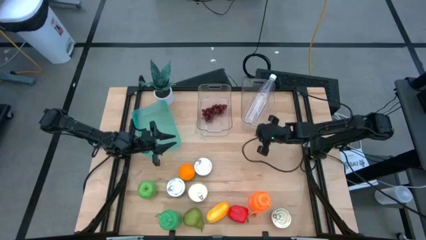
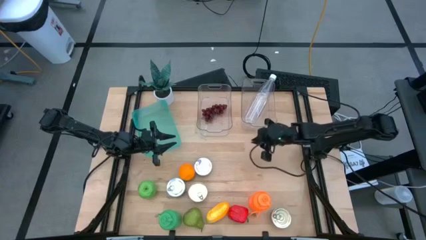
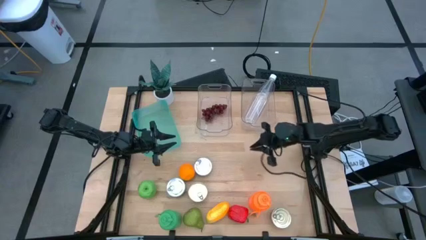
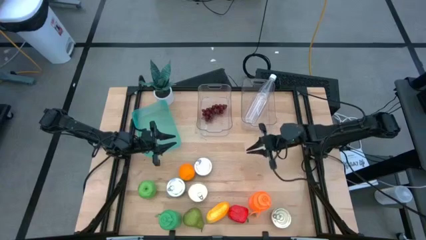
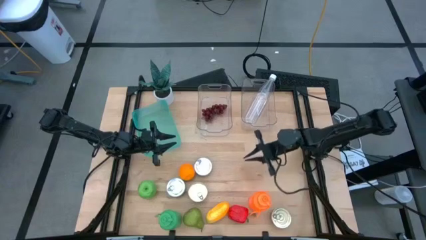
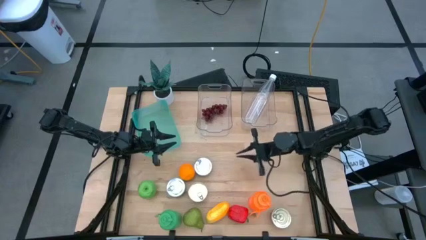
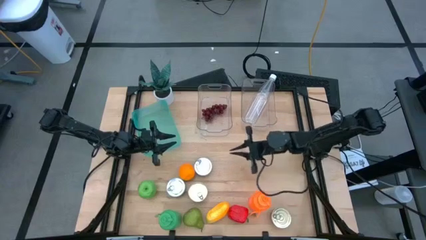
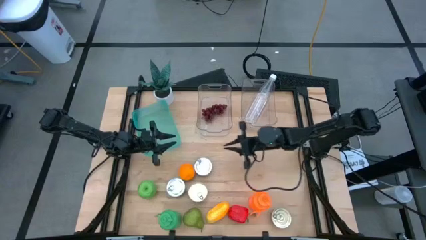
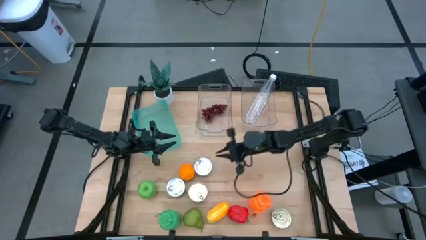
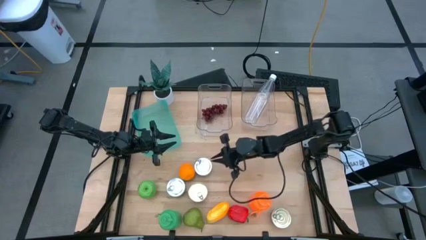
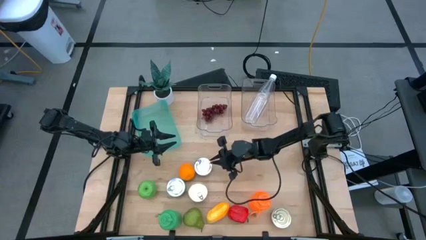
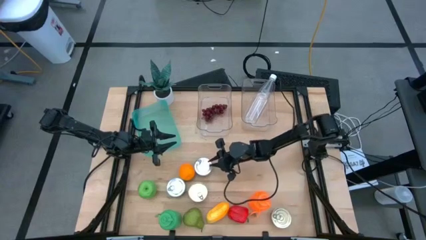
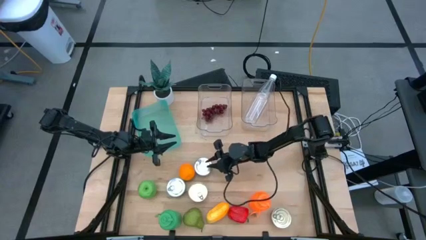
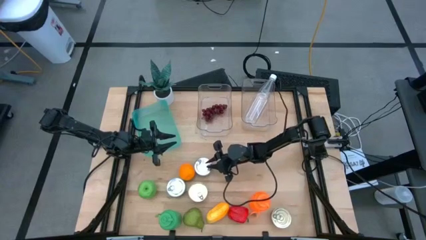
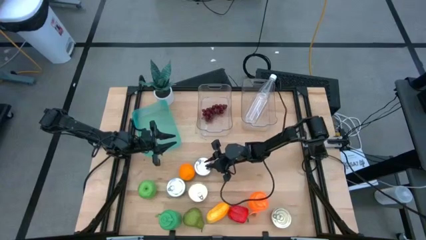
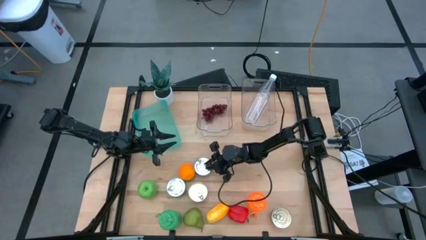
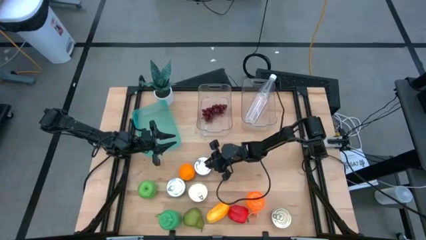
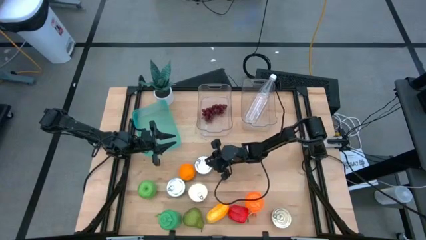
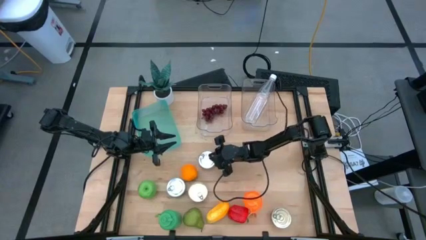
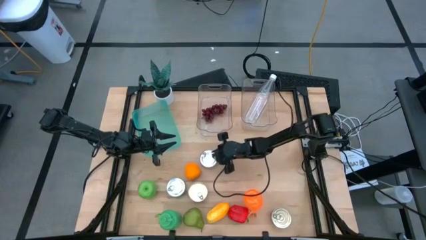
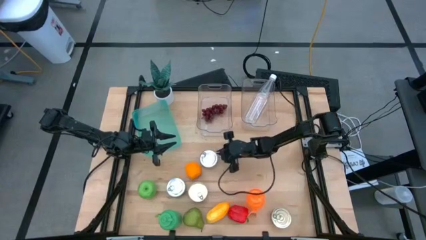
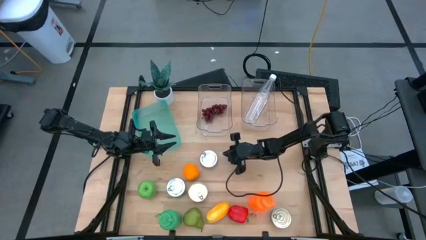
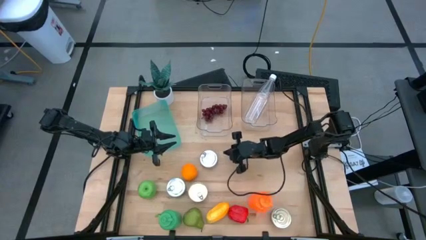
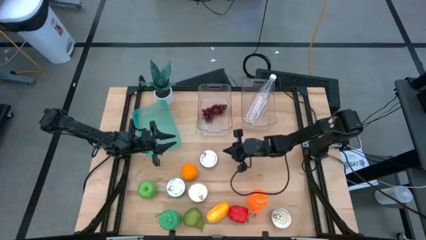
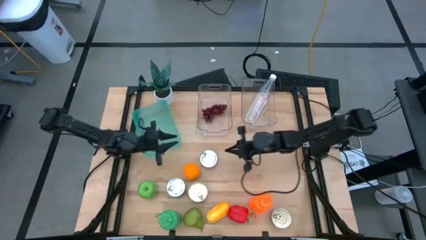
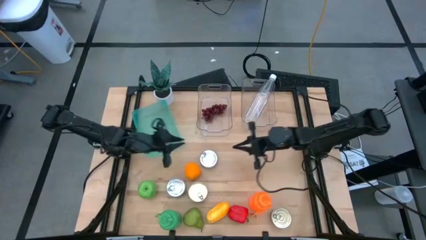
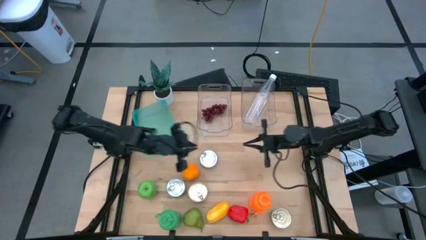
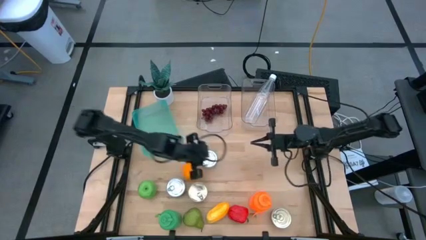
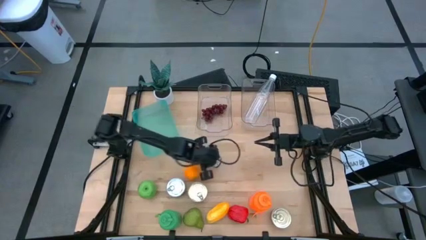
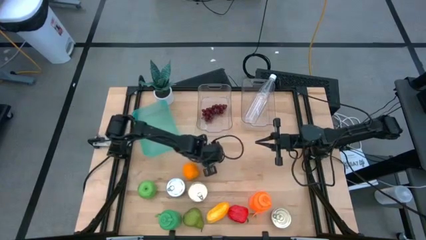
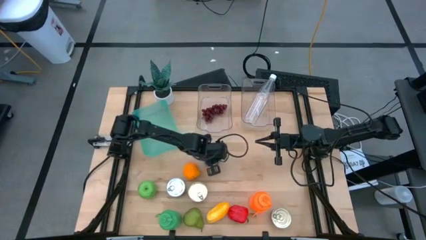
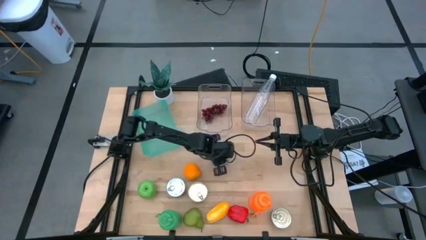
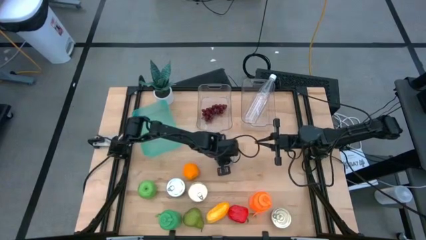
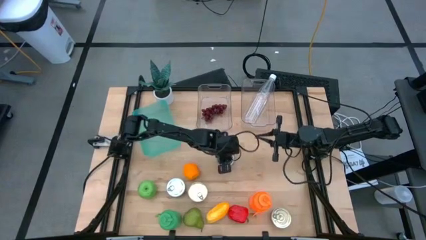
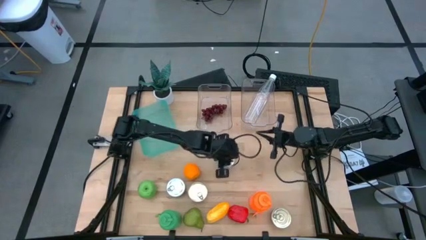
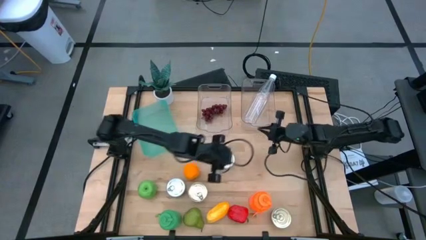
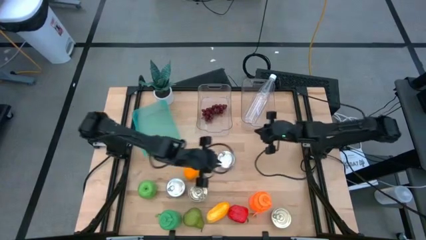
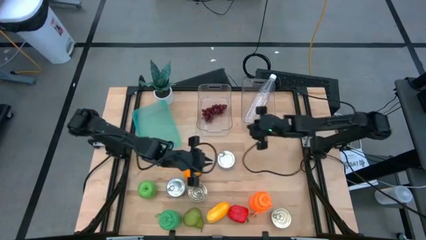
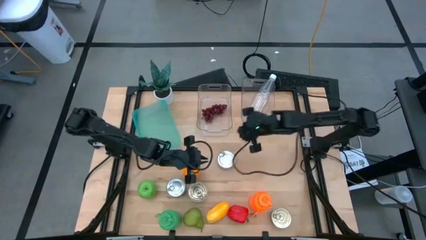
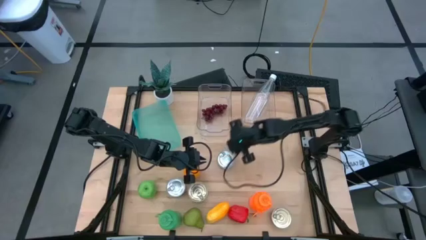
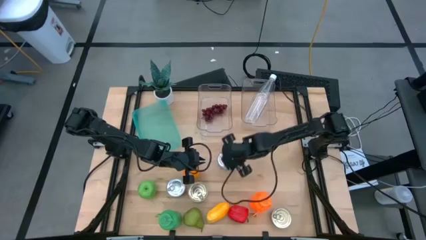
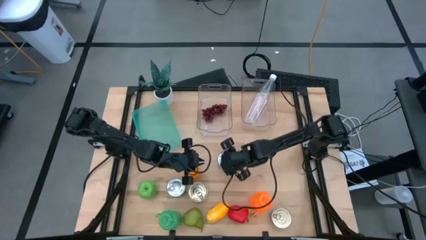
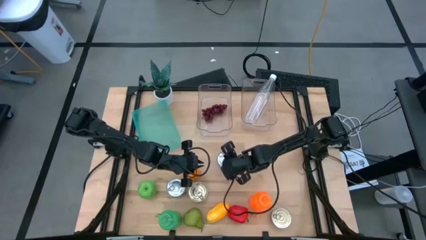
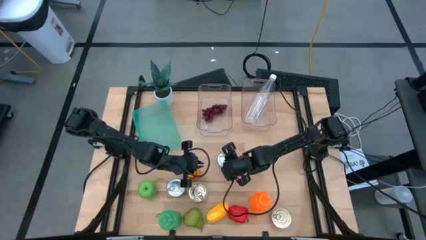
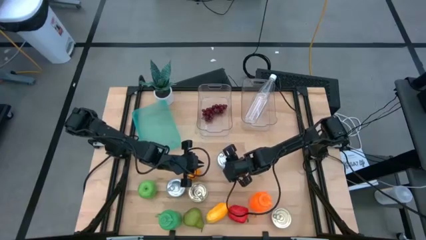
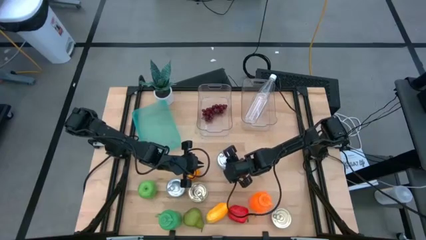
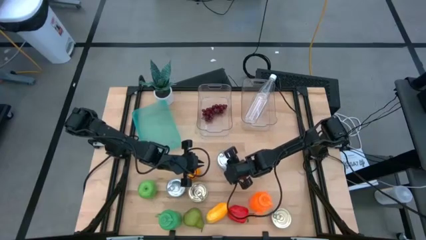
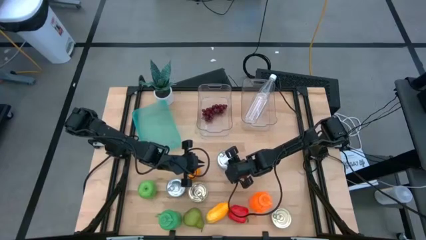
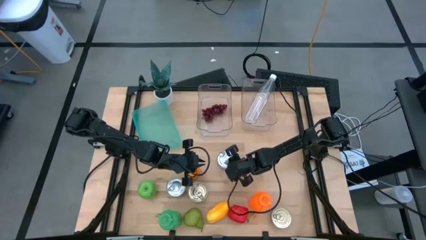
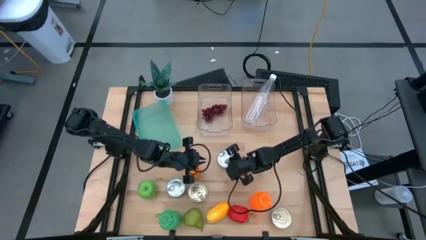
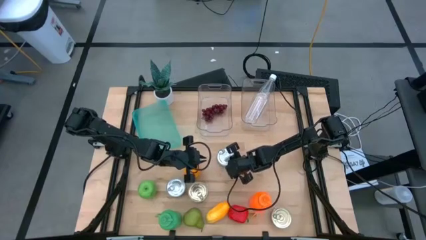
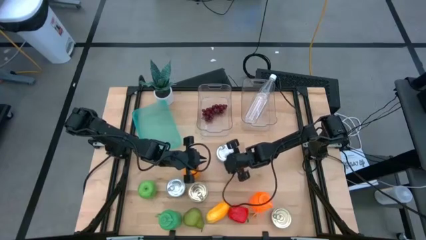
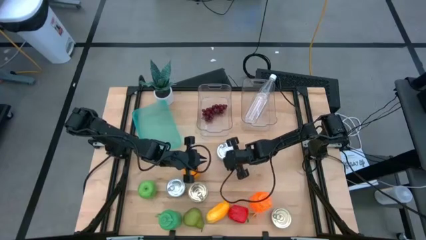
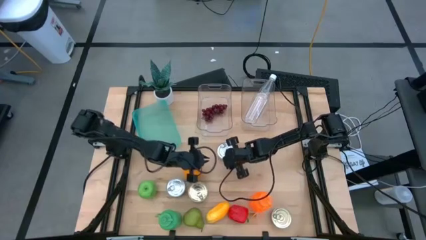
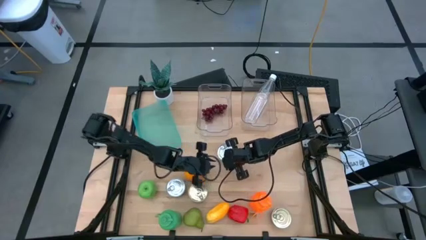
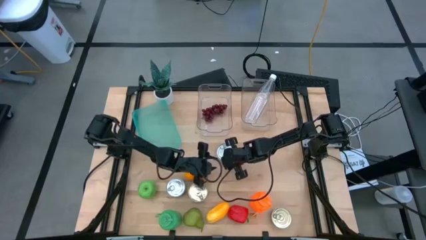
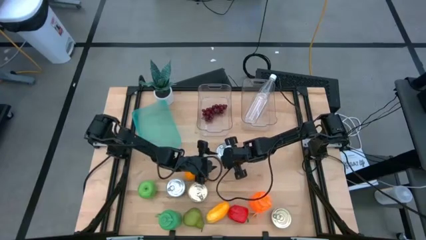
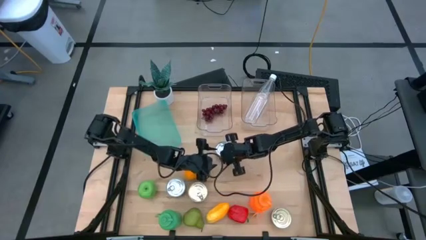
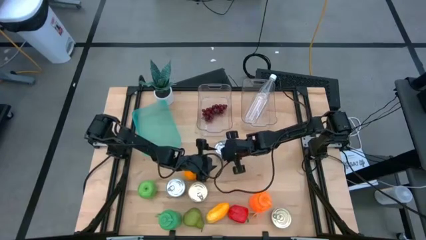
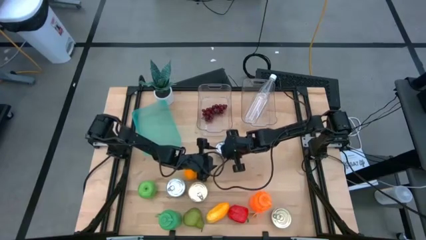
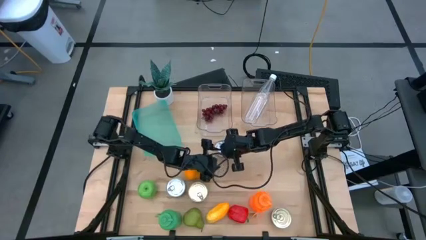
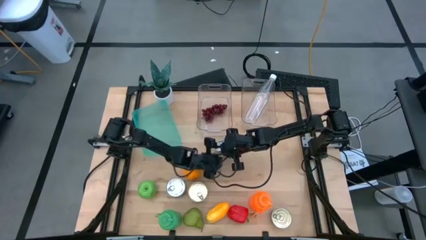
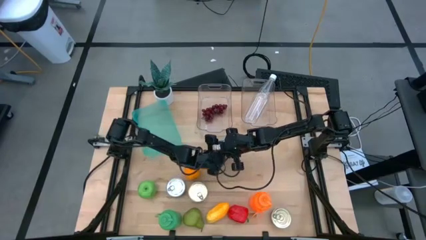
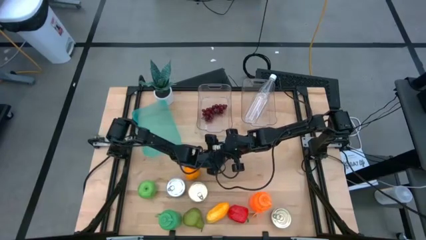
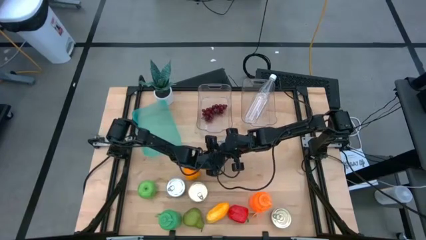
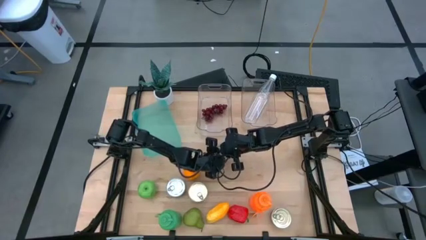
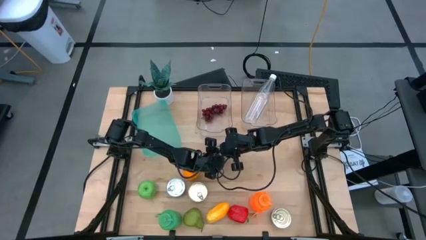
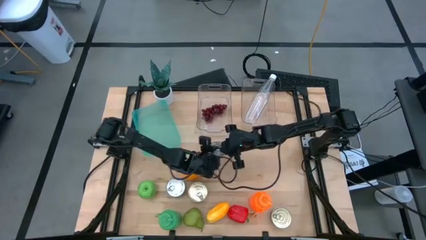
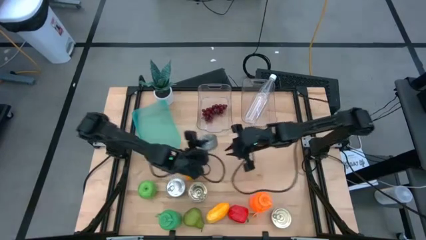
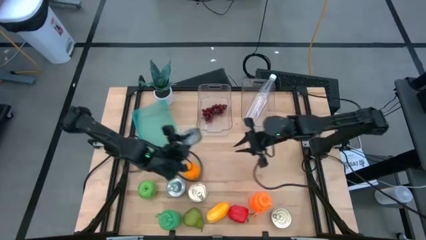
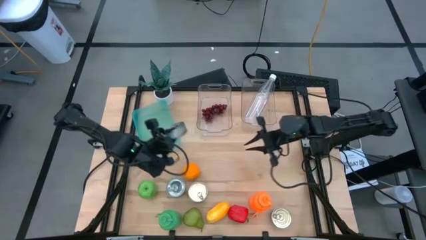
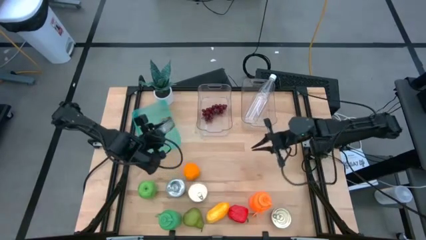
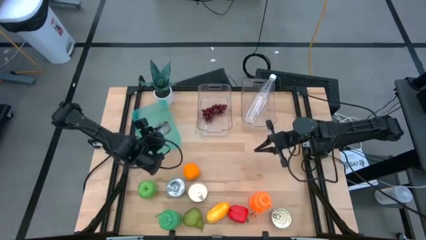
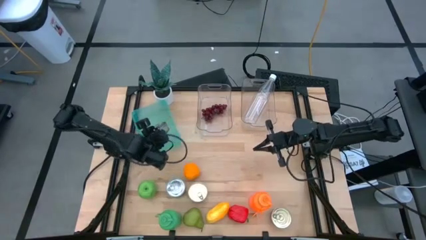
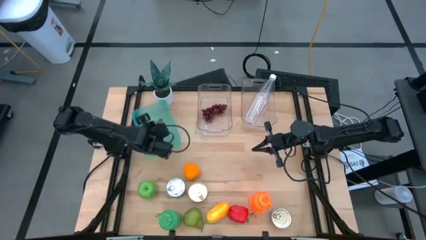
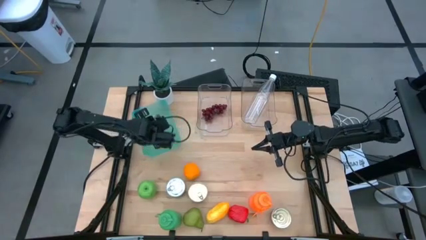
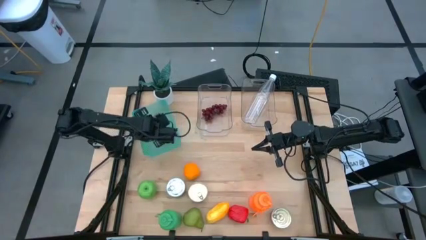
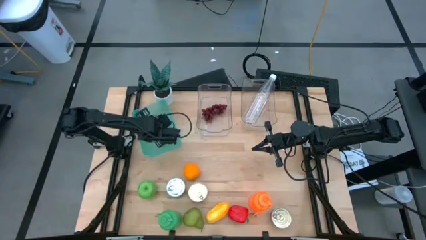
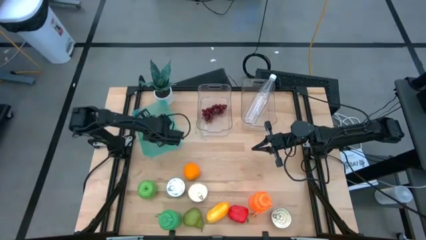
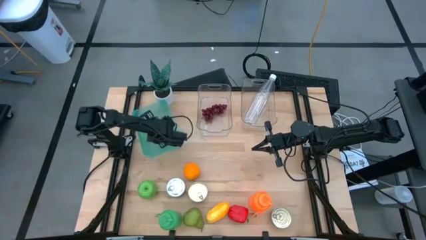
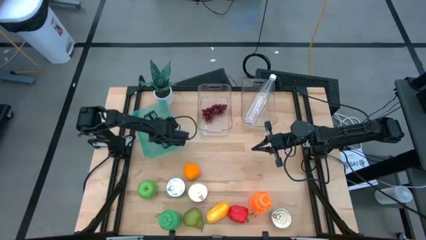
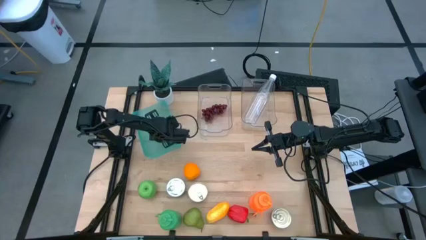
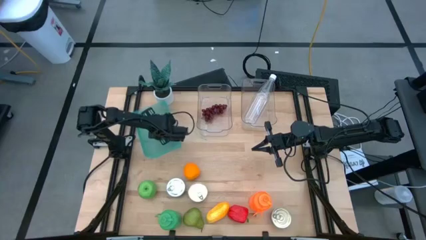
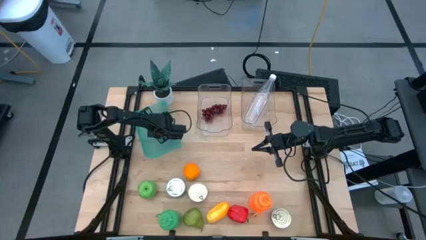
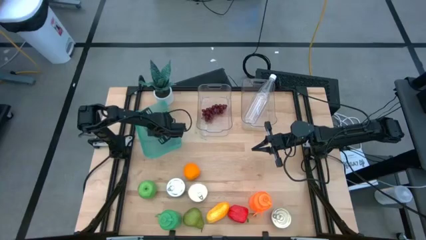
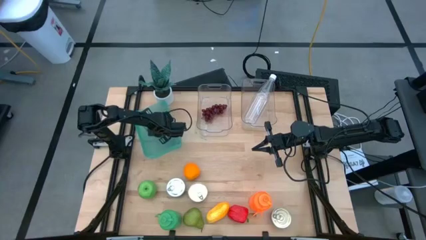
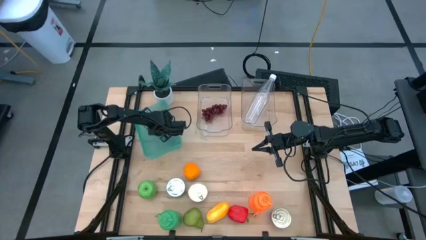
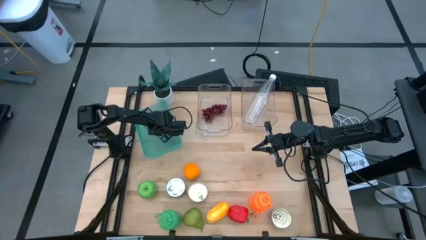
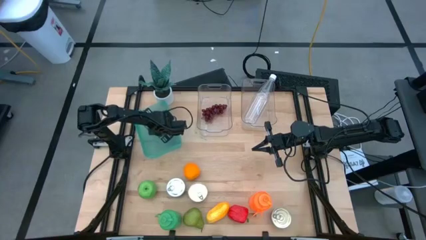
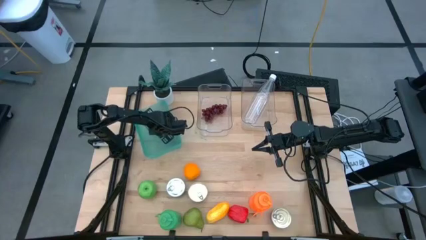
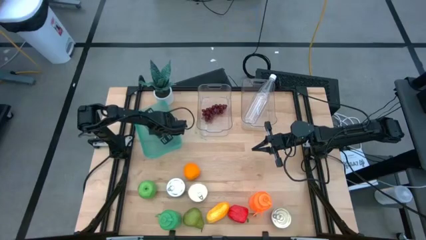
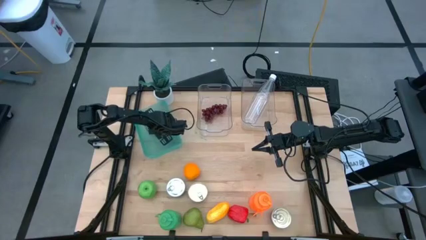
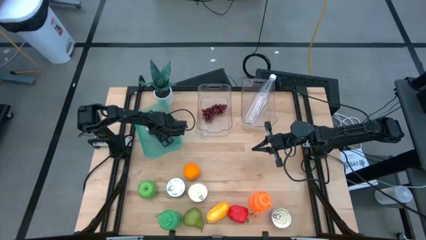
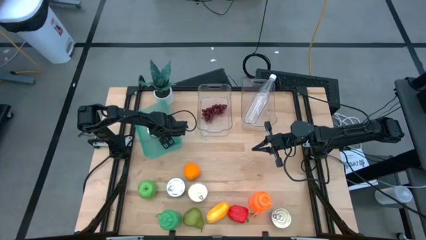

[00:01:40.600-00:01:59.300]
Task: Pick & Place Food Item
Put the right green tuna can into the blue bin
